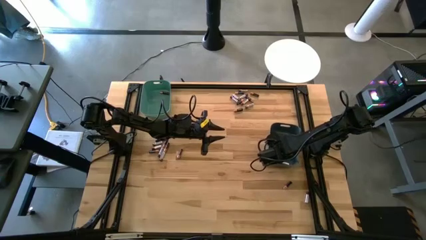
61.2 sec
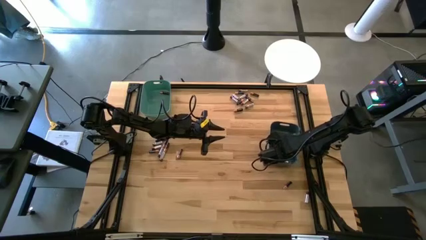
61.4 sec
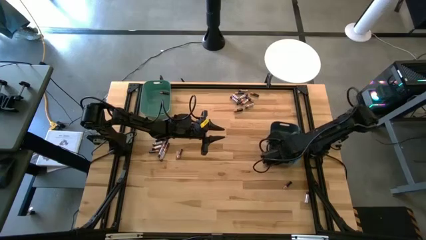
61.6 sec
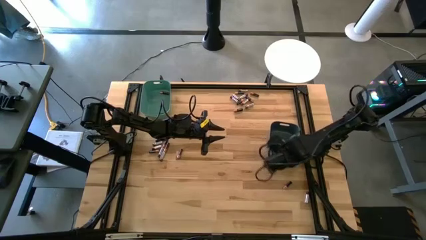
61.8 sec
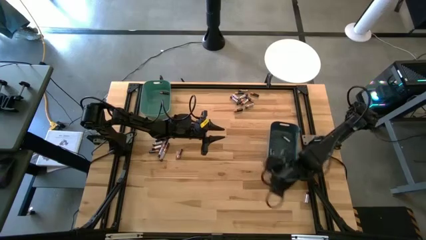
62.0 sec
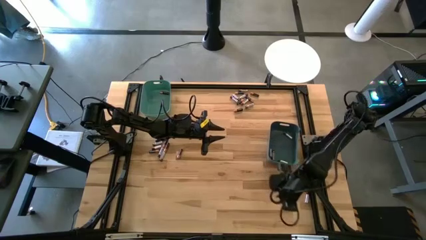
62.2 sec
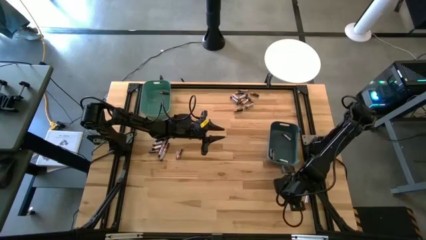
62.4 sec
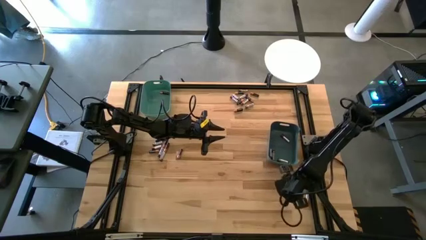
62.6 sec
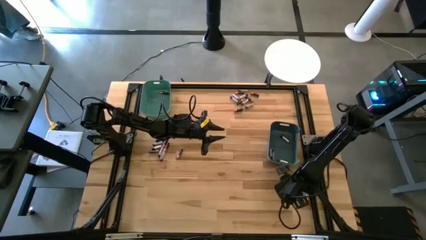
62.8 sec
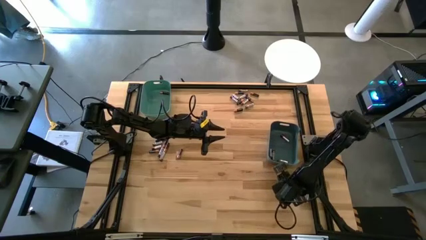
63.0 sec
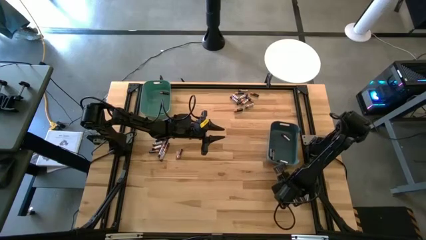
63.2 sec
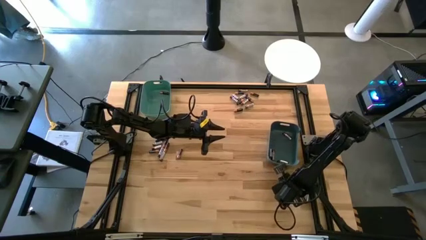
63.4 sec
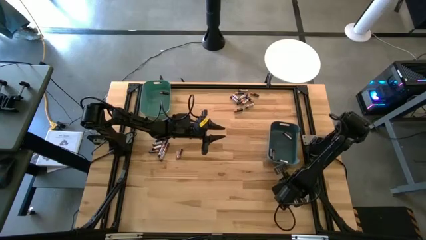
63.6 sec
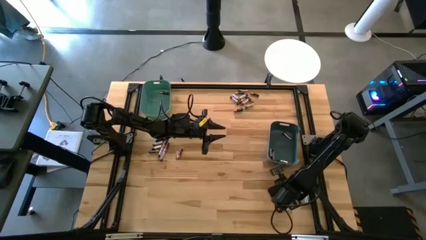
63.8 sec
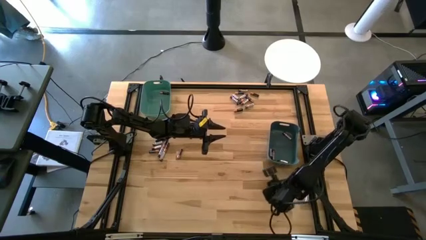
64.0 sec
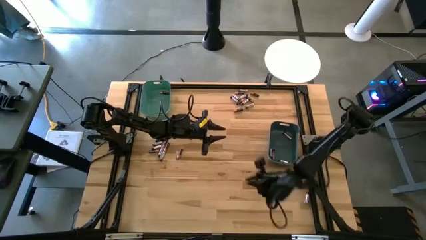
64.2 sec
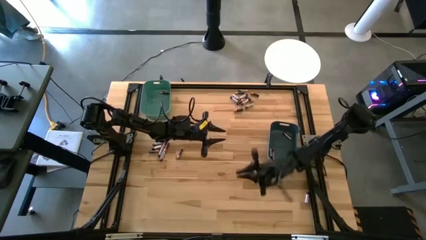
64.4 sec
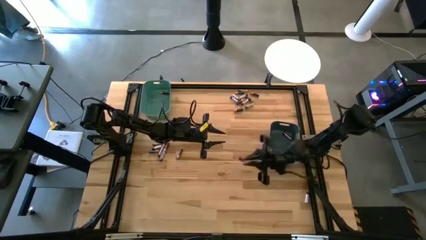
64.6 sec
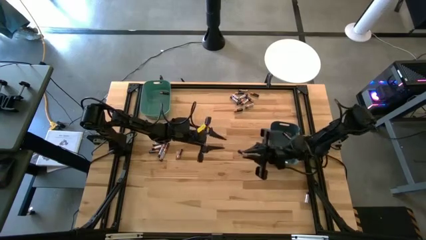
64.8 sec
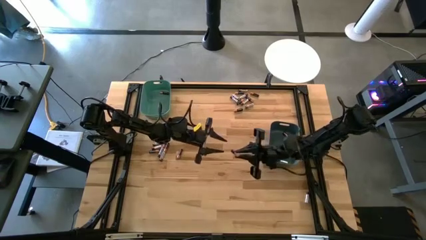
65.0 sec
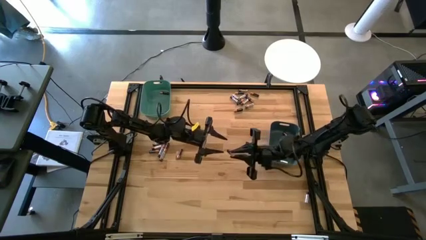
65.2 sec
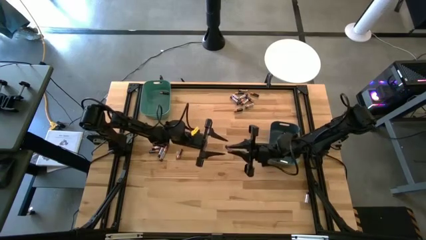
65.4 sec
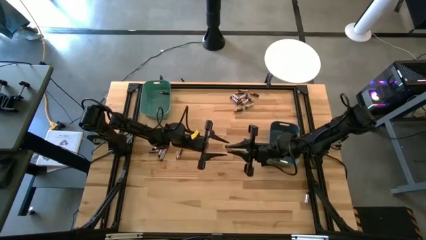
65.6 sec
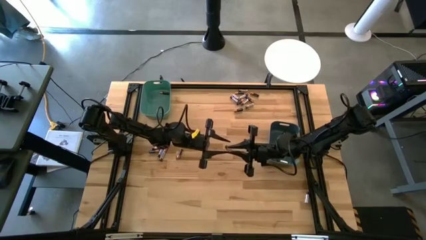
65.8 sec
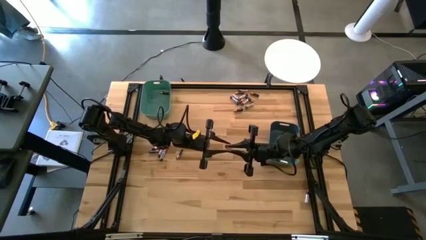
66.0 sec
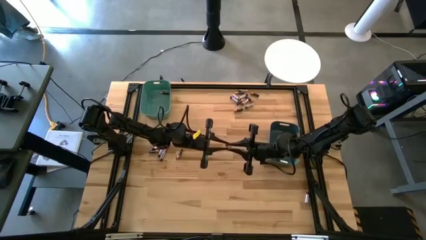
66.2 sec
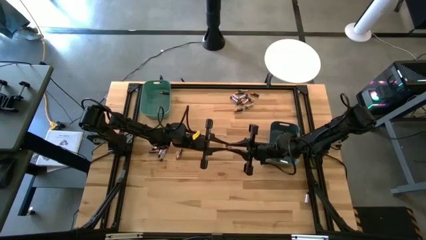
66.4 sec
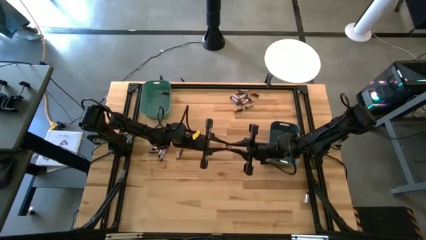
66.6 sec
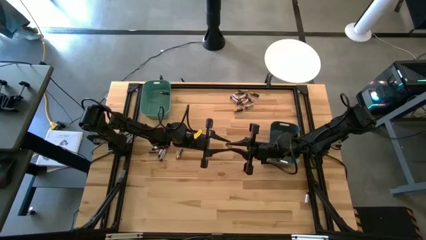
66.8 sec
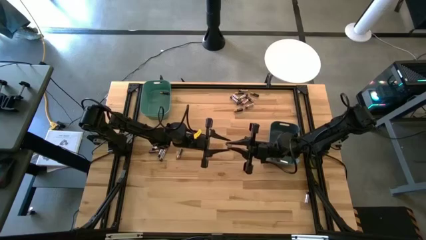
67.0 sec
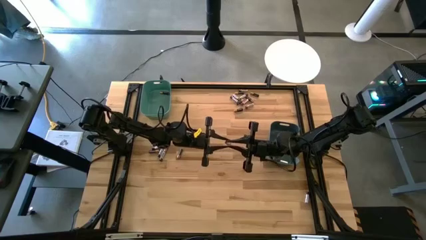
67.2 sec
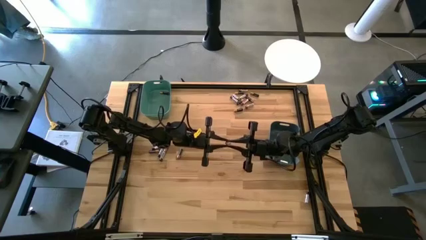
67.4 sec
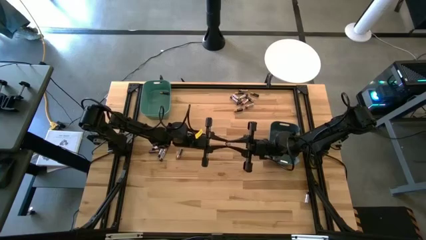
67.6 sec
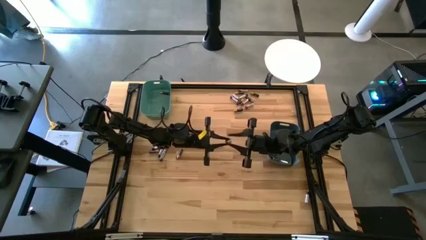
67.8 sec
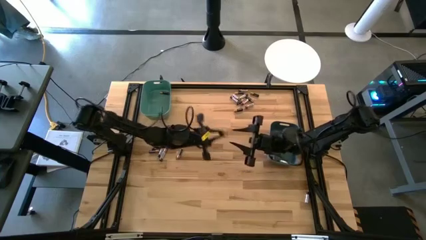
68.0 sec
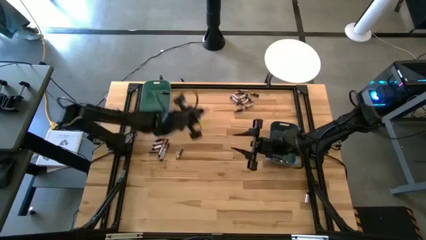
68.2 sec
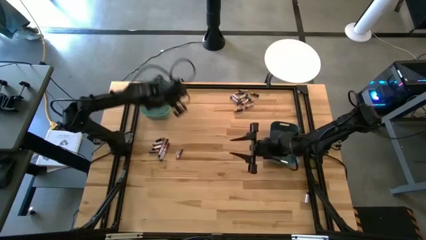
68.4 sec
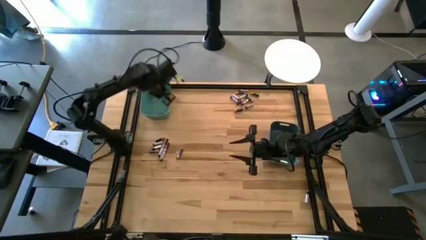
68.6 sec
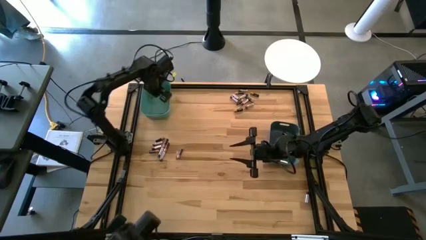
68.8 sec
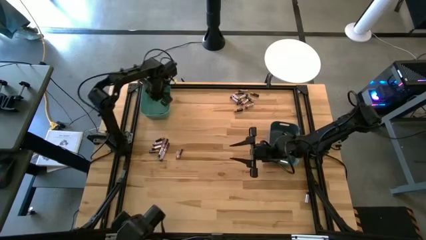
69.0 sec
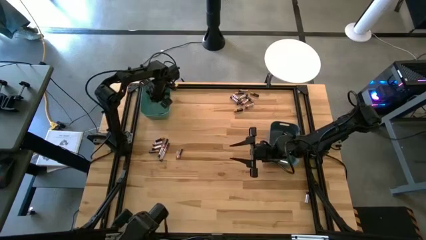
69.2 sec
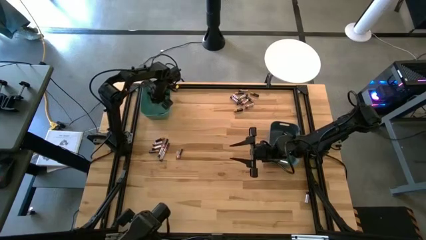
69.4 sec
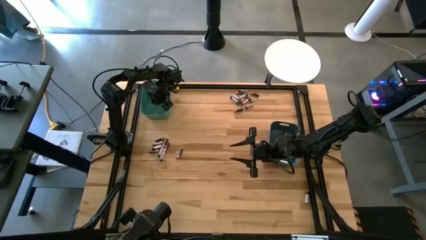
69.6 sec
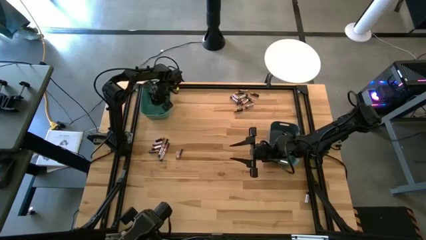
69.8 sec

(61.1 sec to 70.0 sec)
Task: Sort batteries
Put the black battery into the green bin

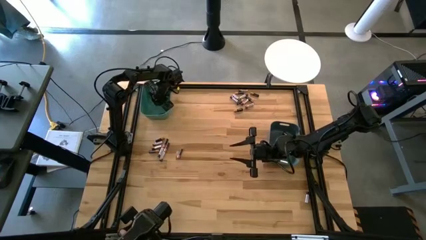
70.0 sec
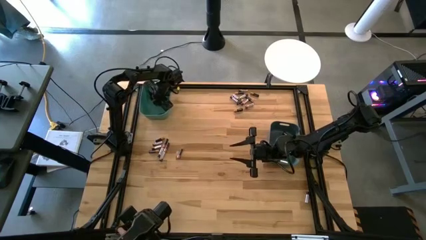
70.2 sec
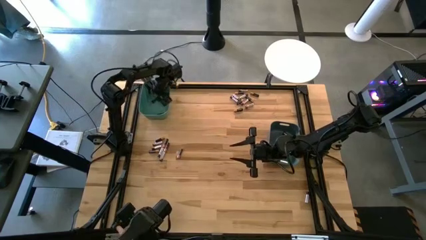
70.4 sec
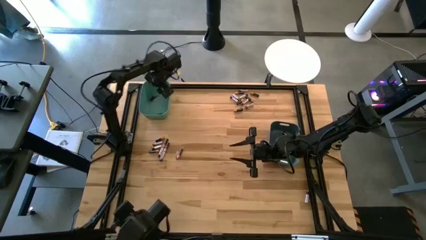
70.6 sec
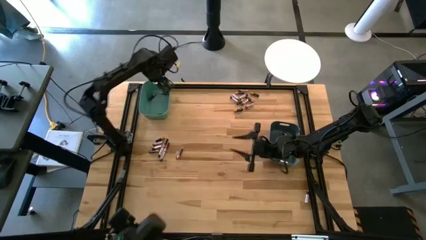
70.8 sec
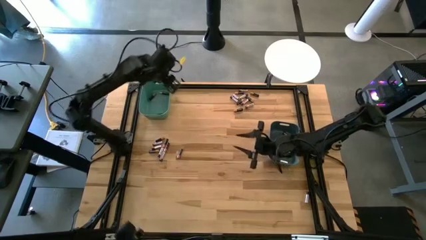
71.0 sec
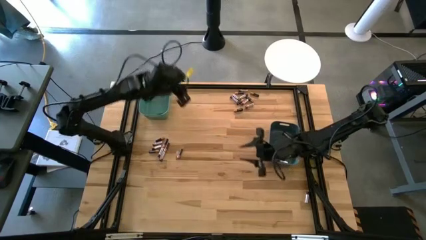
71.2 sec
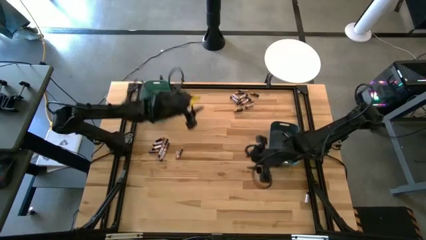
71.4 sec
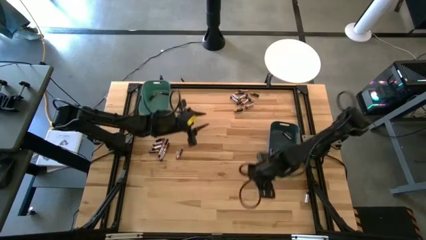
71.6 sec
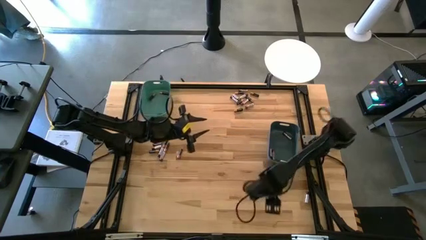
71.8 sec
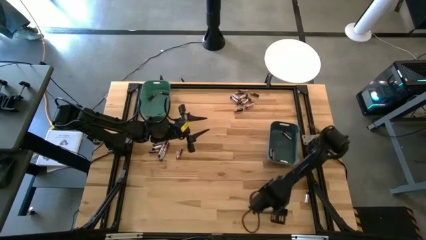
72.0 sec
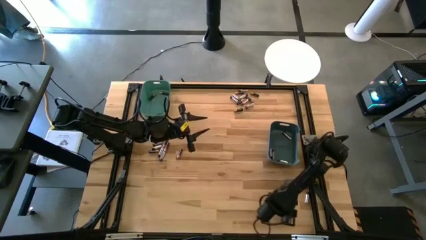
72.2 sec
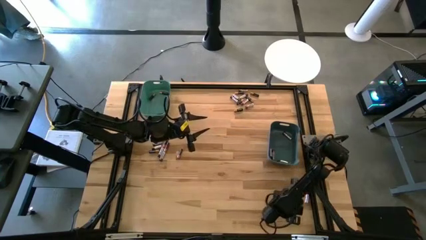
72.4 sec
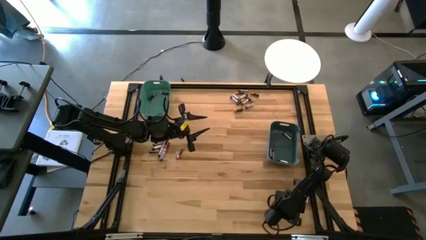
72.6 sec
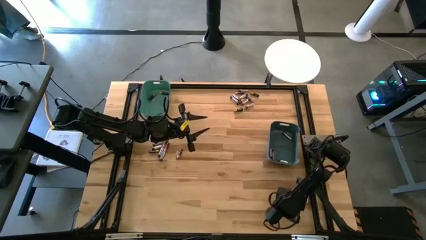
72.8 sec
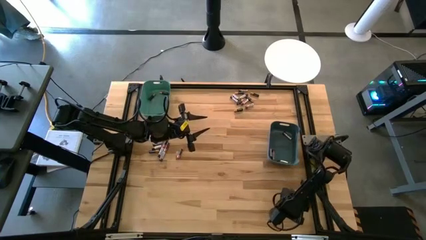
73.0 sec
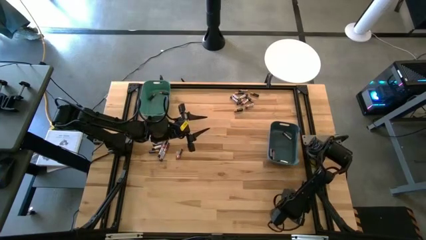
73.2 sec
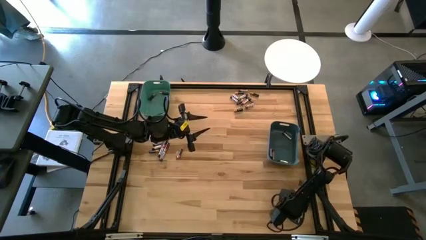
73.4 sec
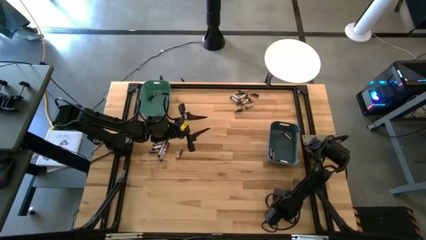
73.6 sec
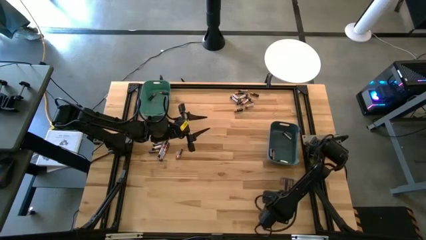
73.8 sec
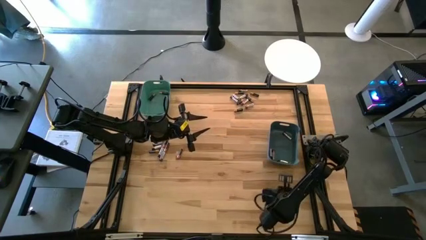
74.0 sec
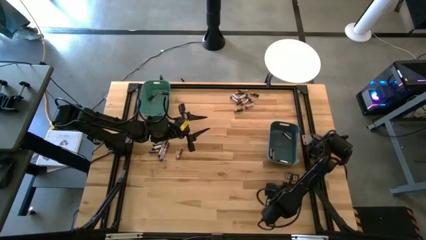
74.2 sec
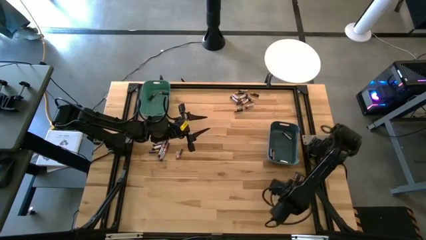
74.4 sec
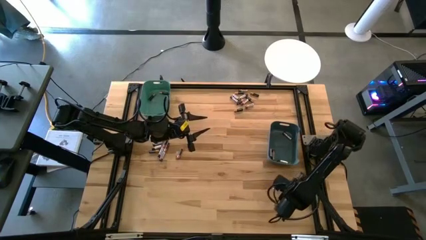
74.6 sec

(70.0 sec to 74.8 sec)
Put the silver battery into the blue bin

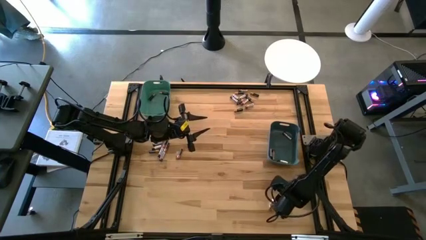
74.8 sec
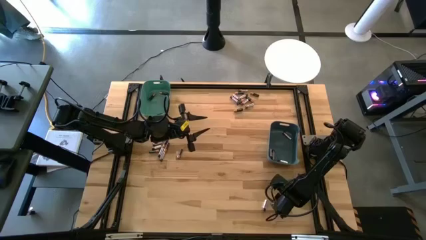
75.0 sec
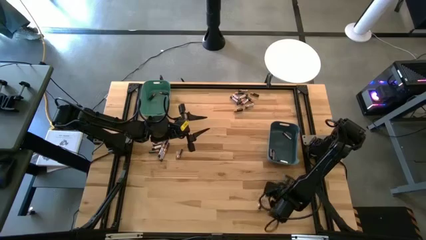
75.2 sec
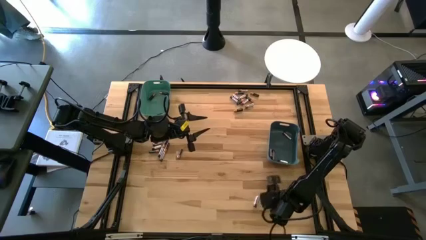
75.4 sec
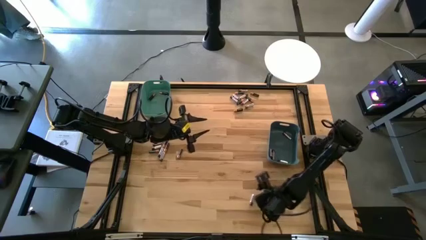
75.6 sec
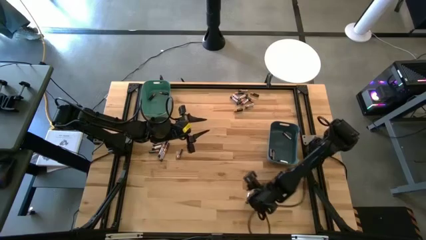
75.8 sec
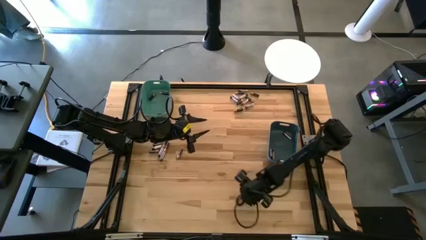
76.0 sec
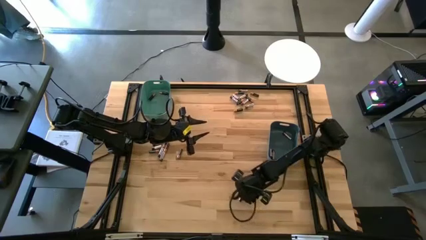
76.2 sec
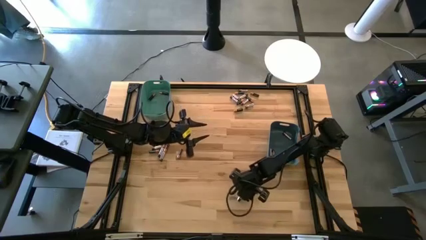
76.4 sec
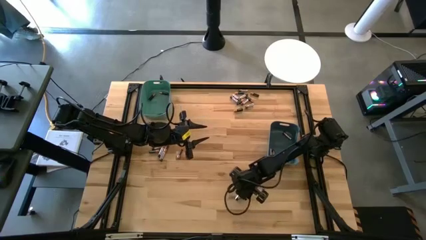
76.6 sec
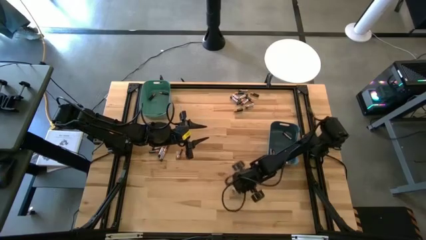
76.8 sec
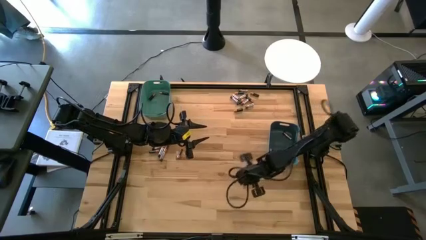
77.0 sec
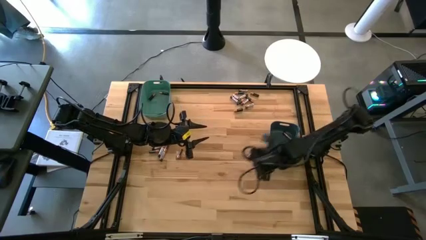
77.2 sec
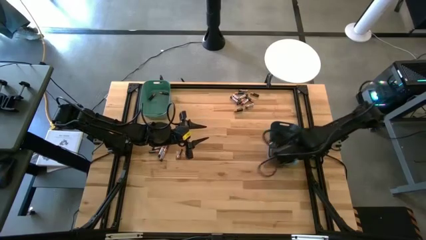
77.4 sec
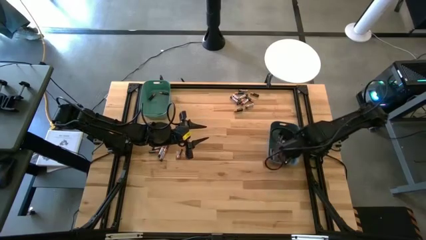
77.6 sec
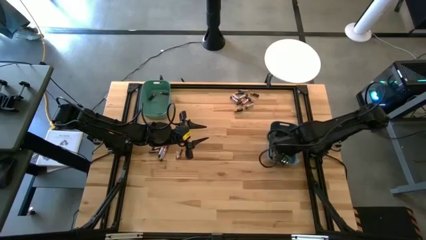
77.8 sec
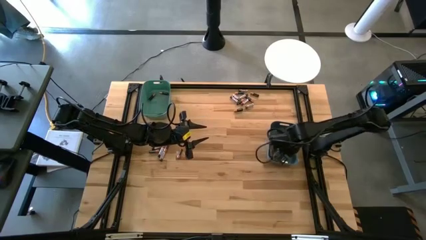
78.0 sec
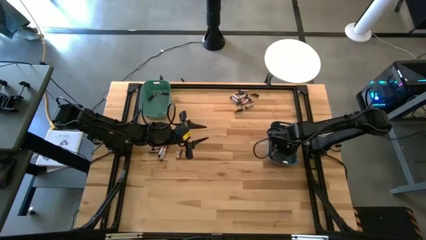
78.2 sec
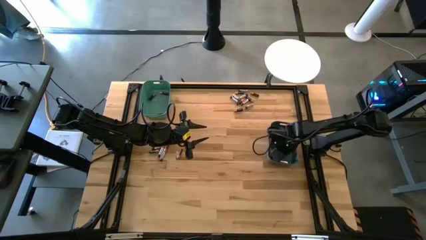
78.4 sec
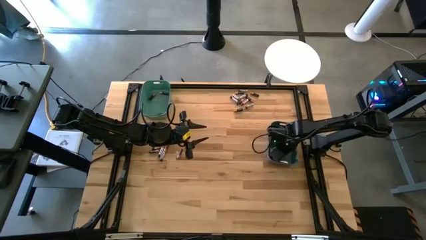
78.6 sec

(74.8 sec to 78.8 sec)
Put the silver battery into the blue bin
